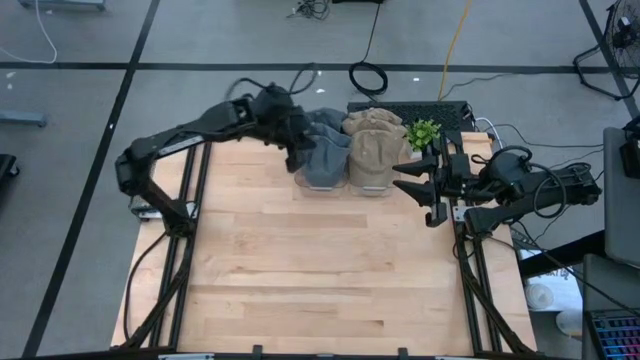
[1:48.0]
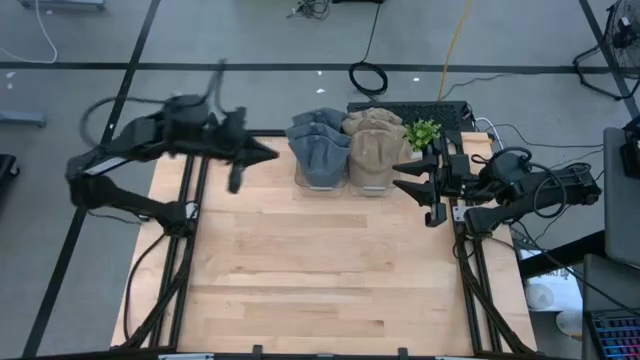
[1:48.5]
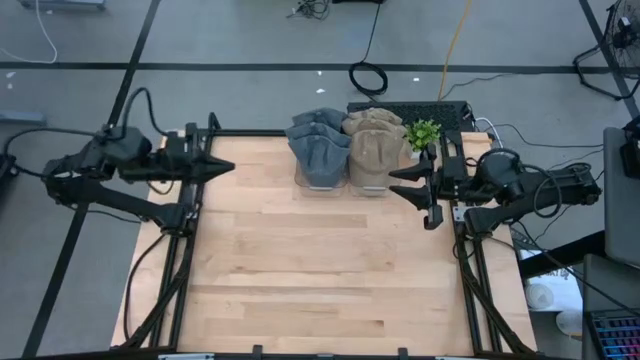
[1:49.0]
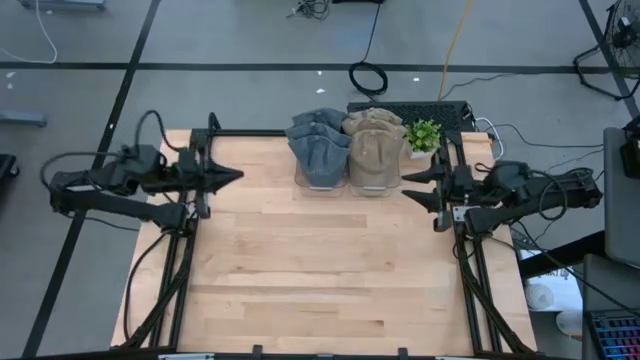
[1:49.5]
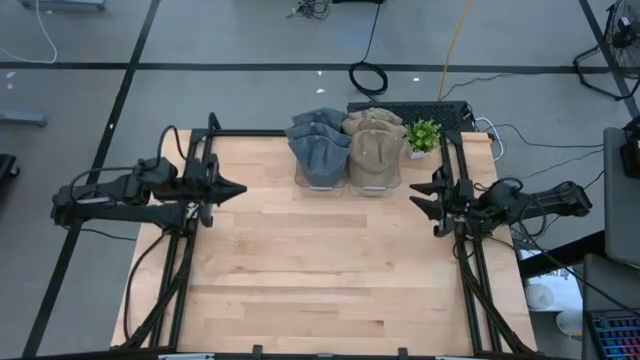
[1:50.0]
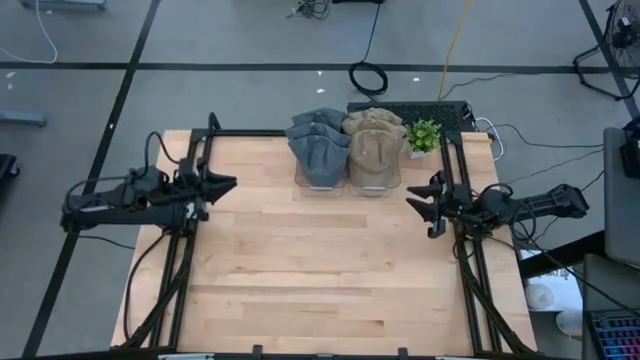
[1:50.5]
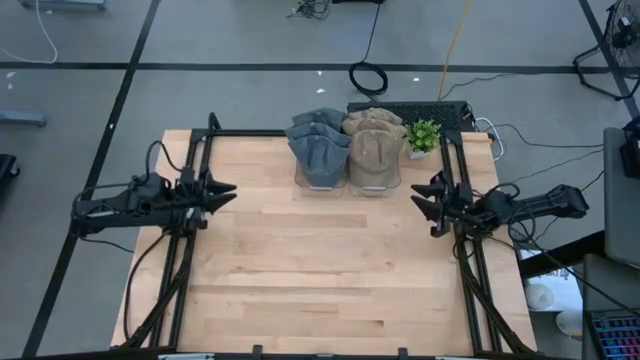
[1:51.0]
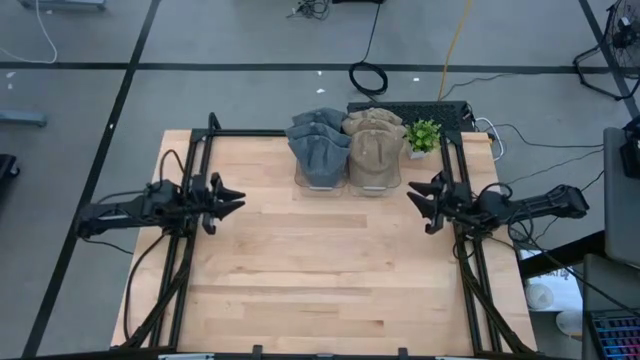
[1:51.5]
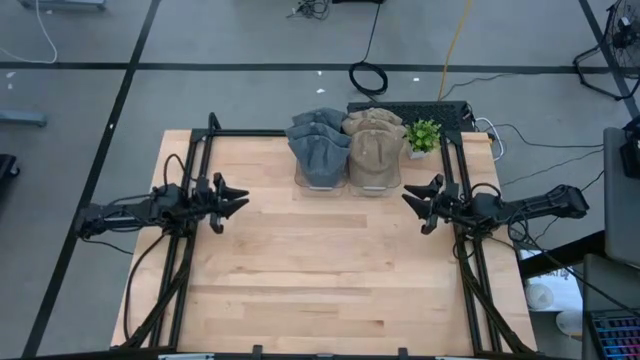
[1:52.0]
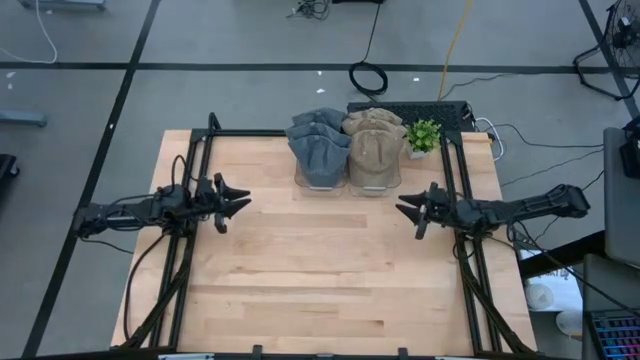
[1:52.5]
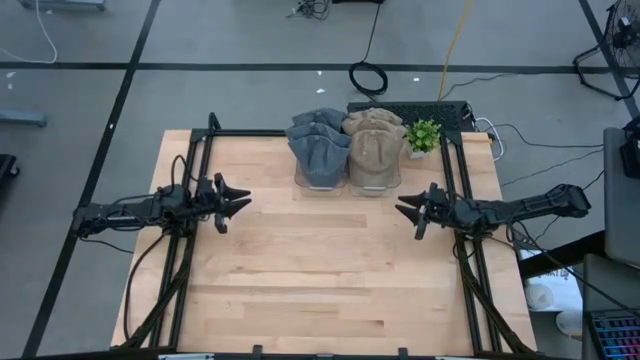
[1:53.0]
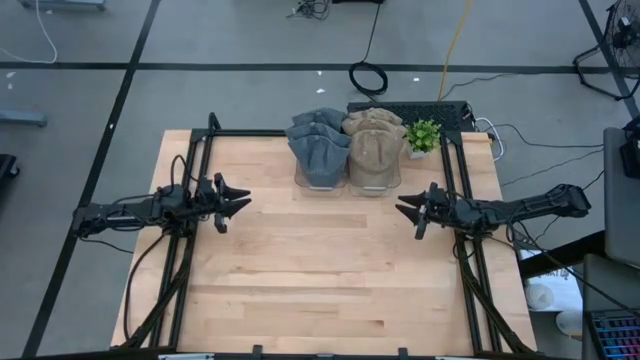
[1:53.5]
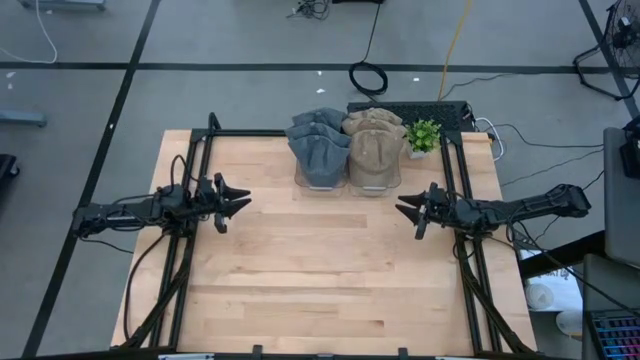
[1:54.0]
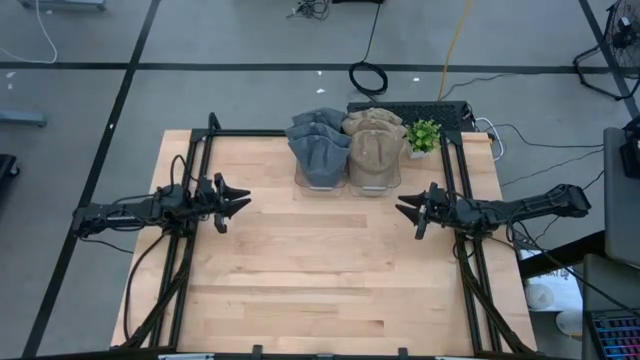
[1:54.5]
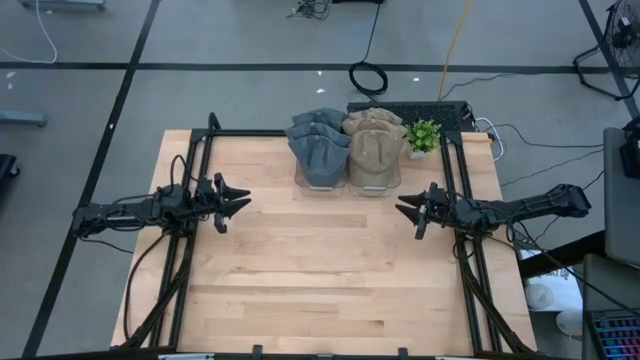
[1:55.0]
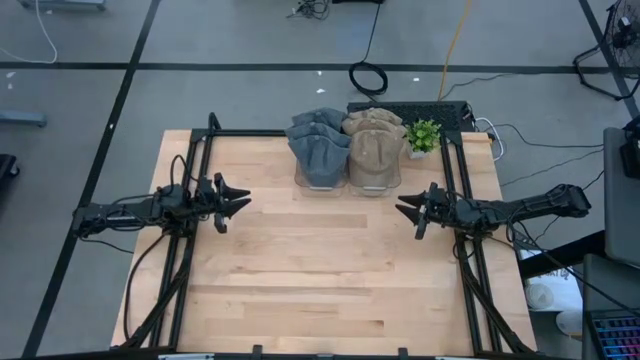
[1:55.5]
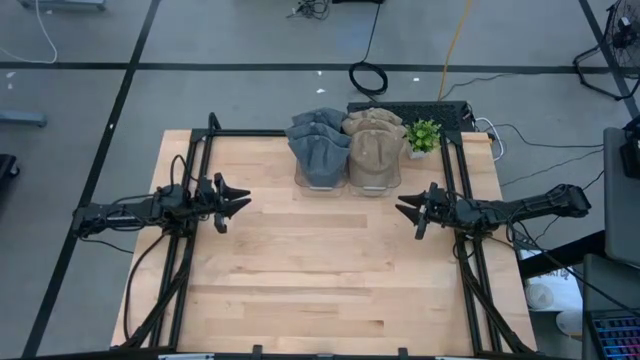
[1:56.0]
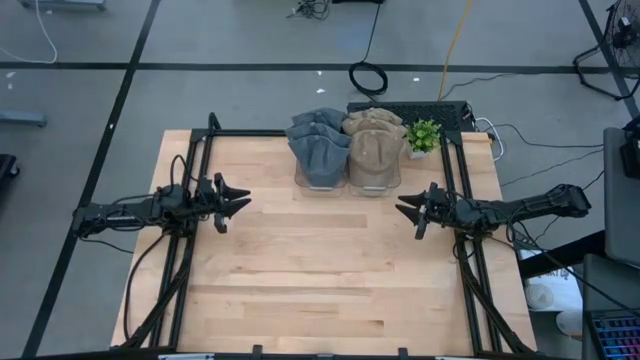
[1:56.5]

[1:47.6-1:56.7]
Task: Pick & Place hat
Return to Home Position

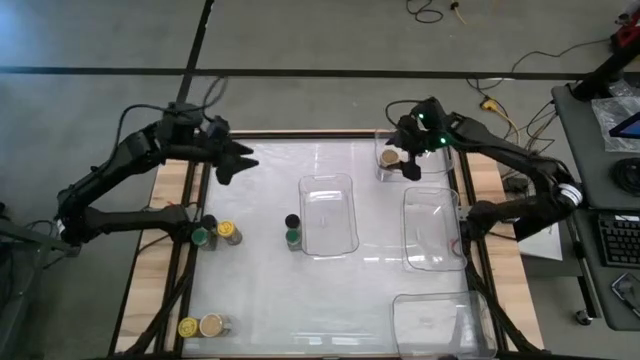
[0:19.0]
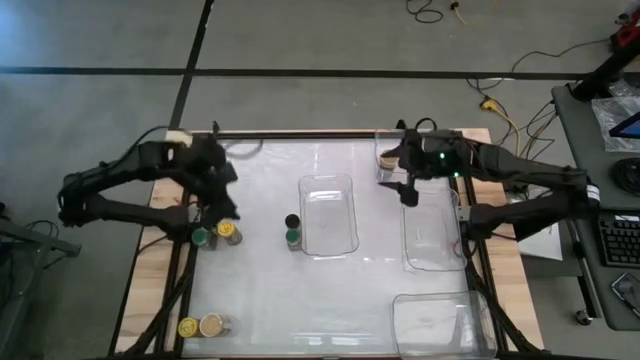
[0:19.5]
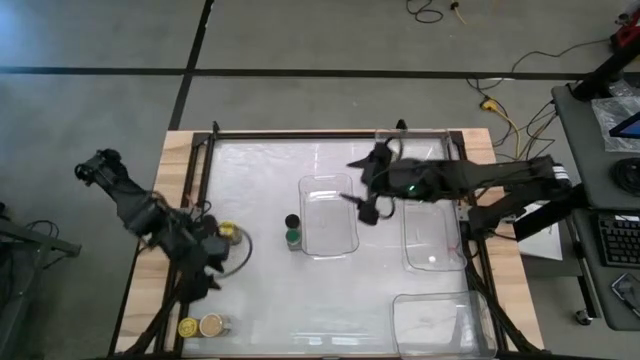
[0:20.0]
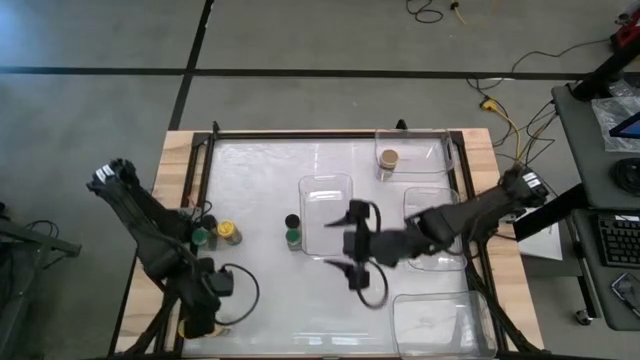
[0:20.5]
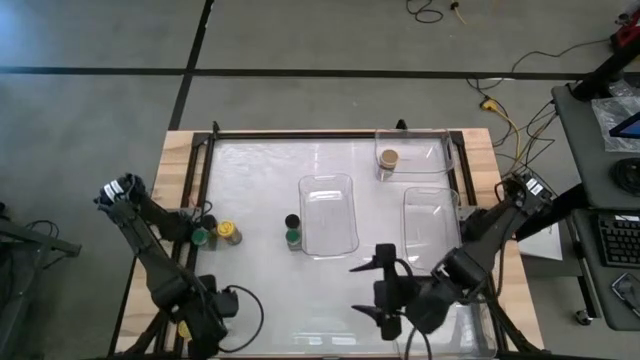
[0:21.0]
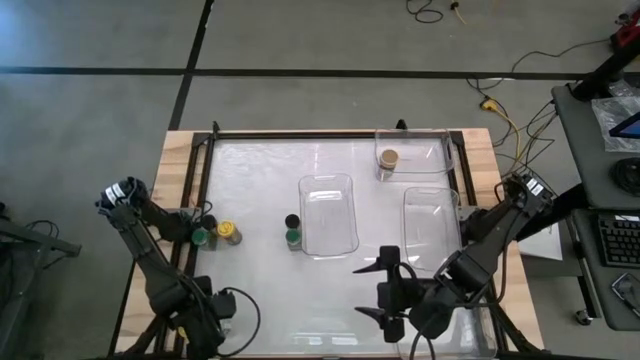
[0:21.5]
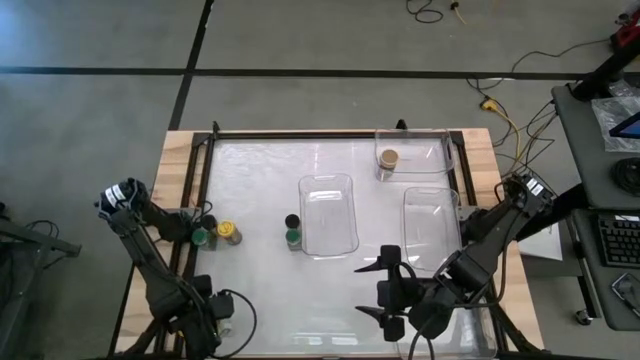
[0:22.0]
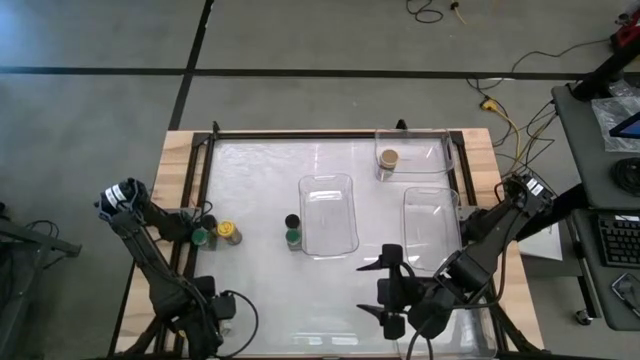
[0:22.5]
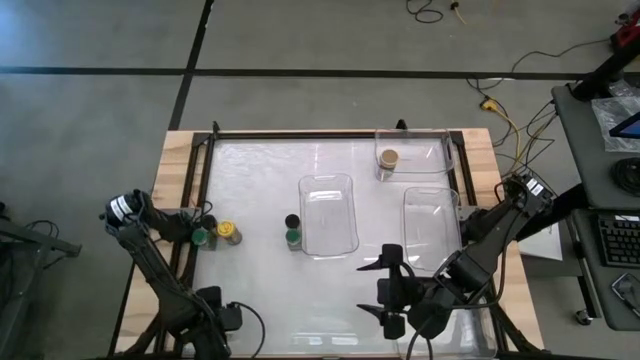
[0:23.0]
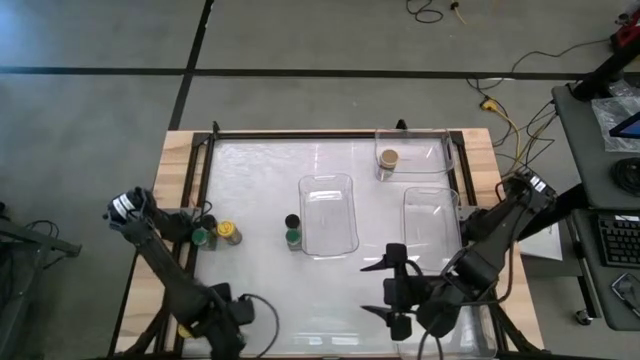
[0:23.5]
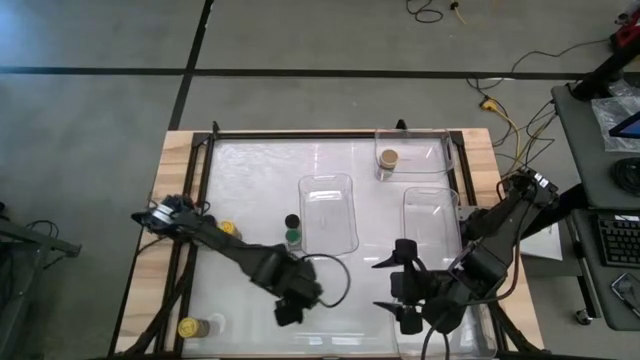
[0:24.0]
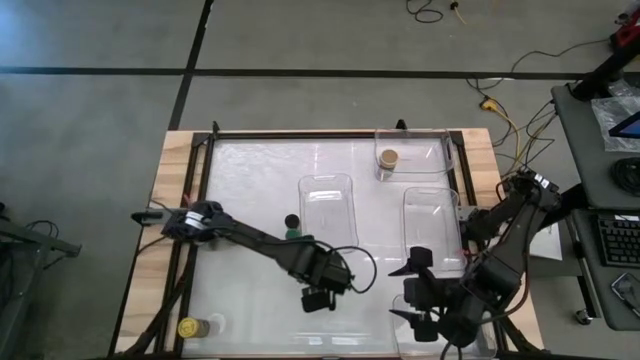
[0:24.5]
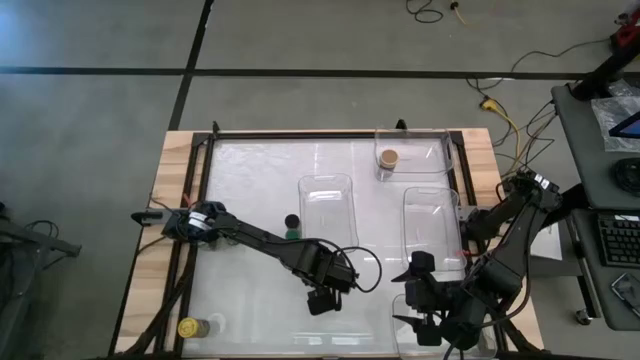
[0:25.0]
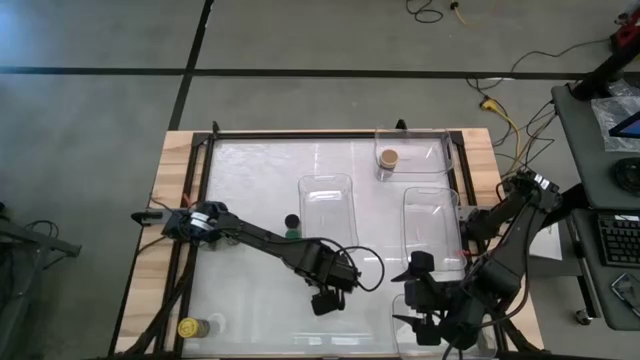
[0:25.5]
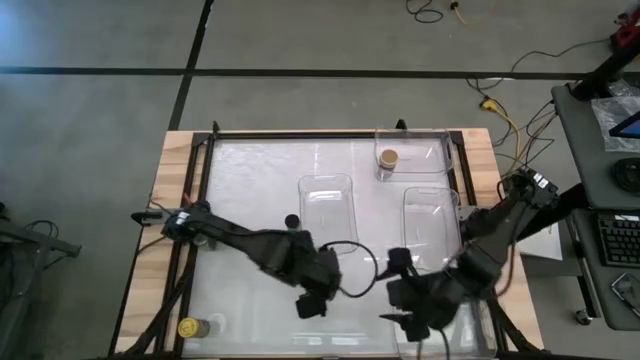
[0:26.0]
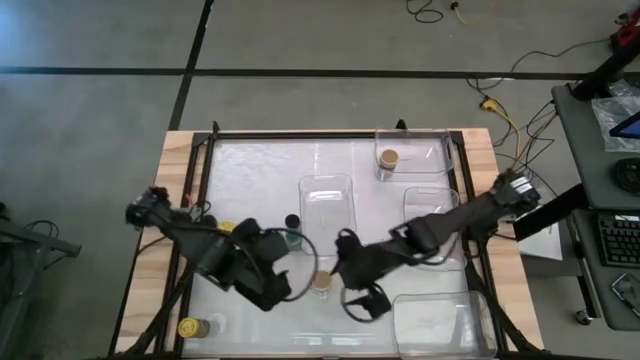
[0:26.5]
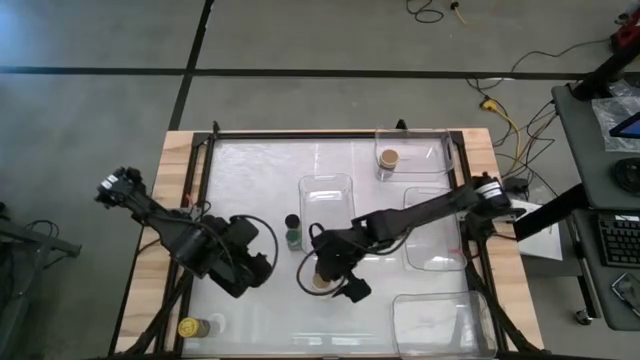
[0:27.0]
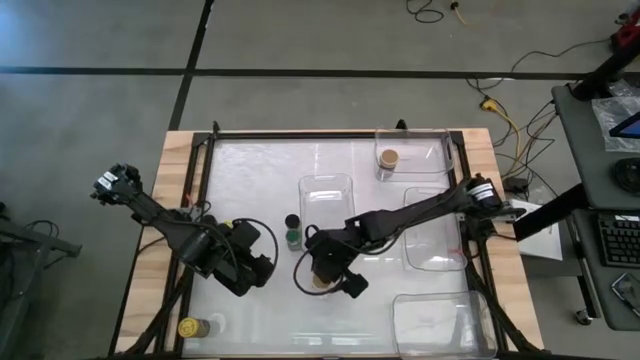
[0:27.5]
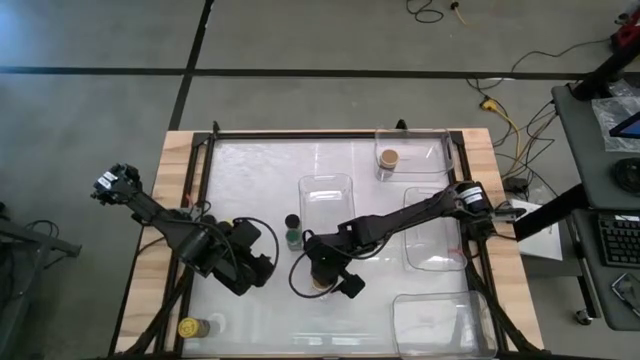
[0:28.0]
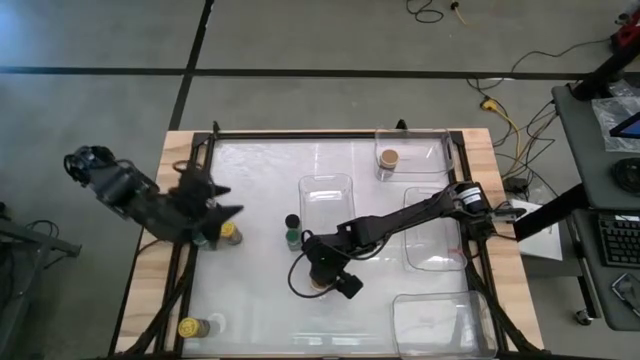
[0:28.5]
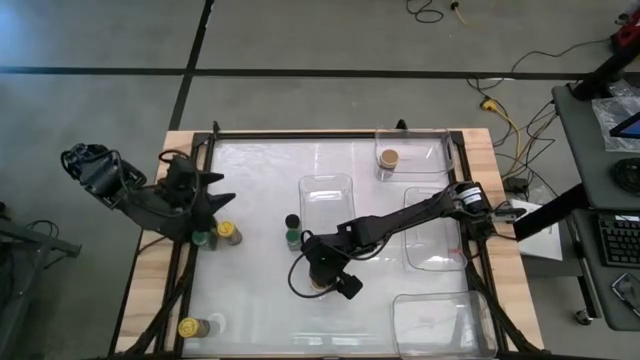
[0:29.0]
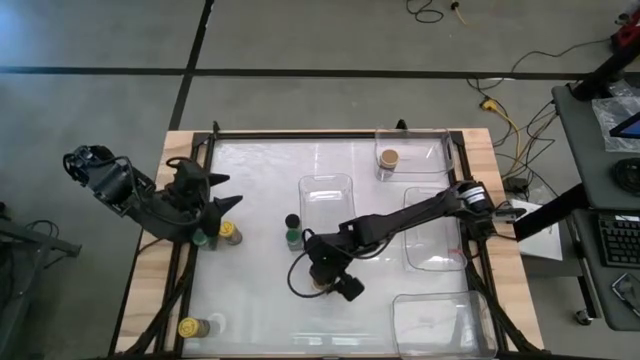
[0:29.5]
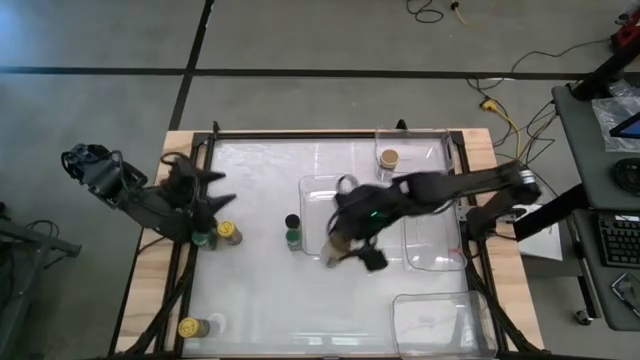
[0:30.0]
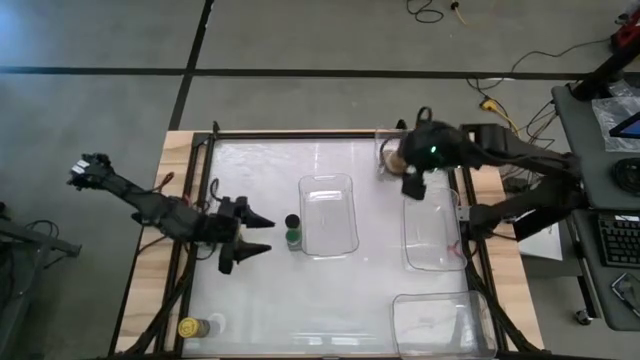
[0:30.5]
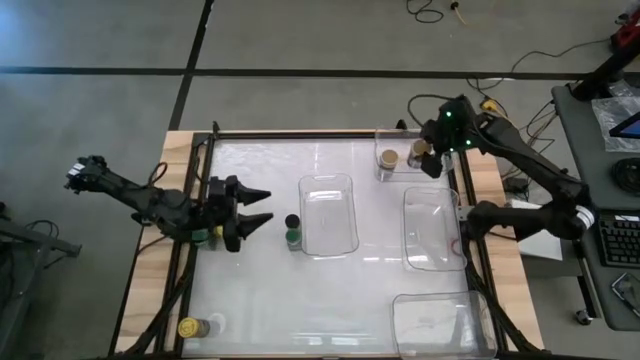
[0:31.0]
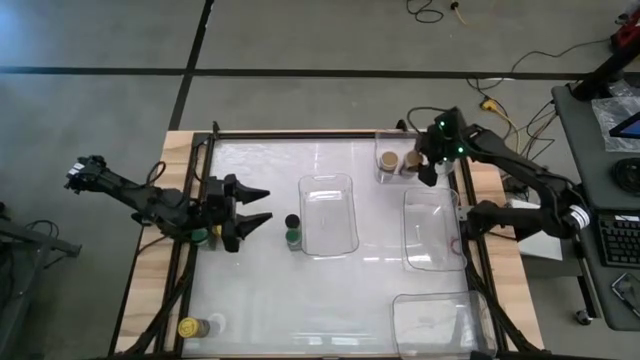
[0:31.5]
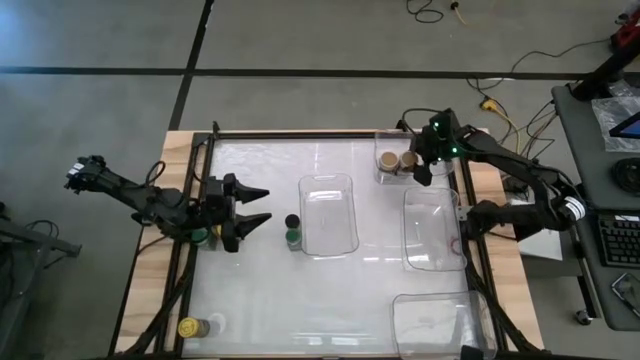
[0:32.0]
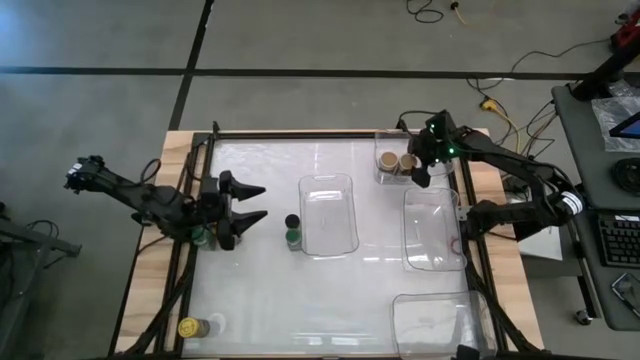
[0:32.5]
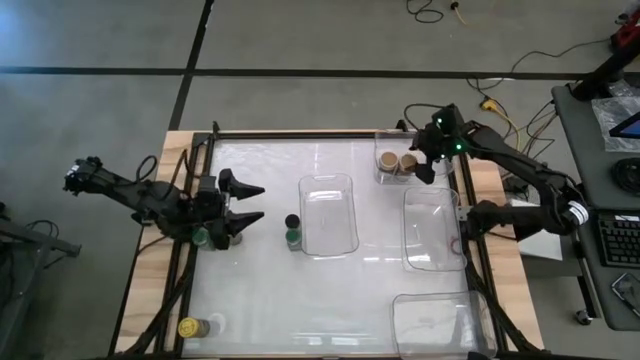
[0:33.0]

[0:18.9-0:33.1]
Task: Sort spices by type
Put the gold seasoning bottle into the top right transparent bin
